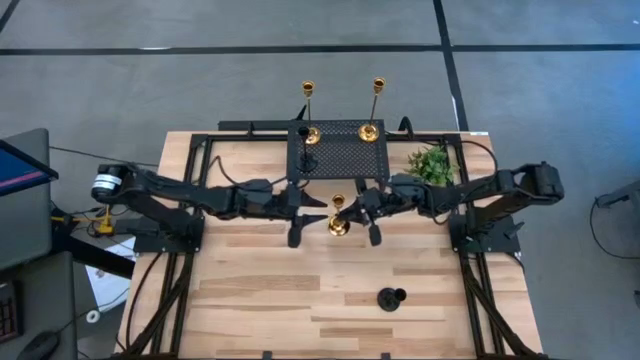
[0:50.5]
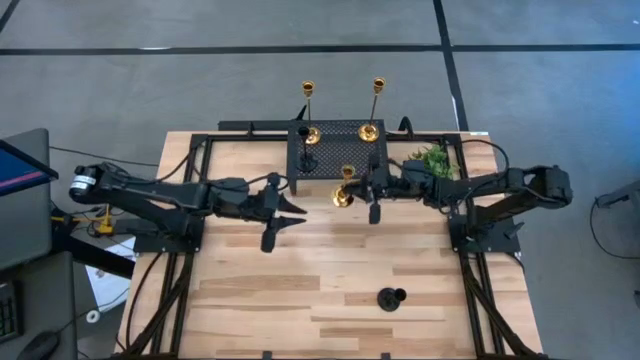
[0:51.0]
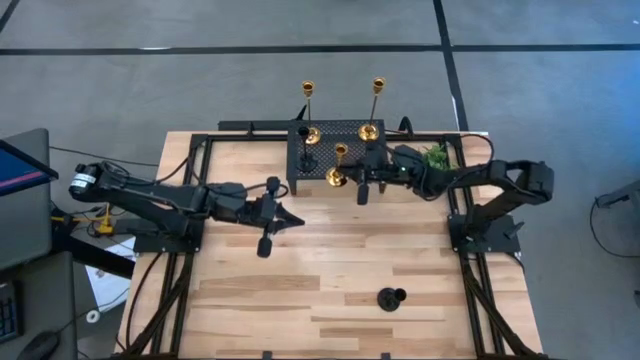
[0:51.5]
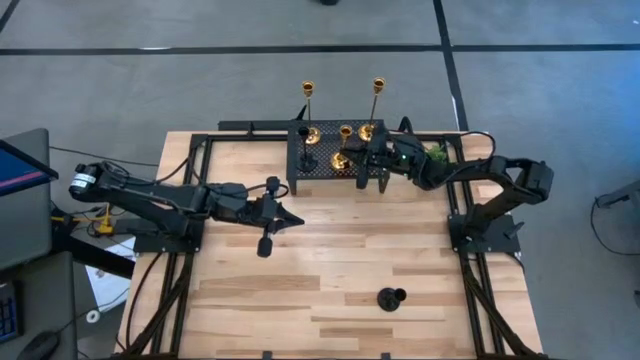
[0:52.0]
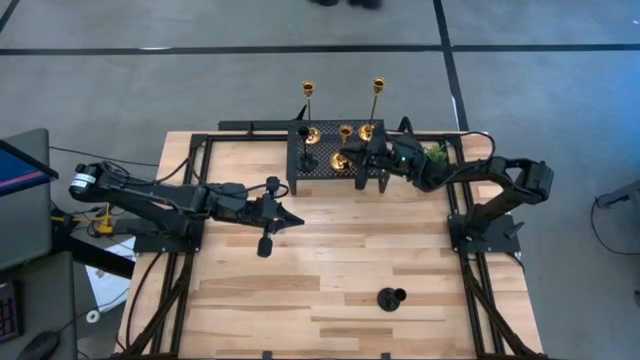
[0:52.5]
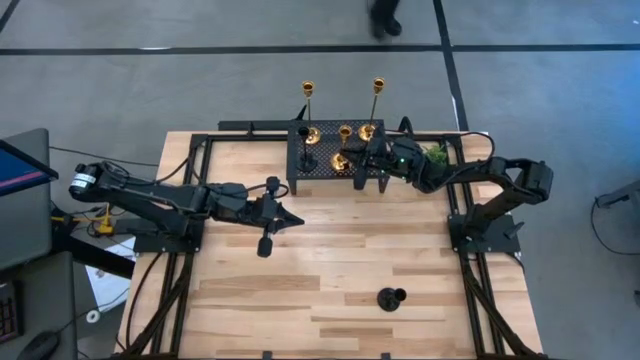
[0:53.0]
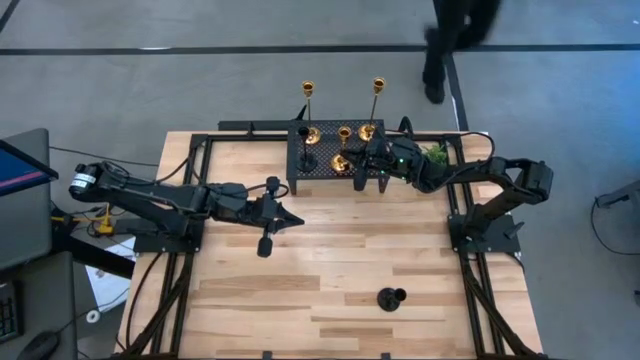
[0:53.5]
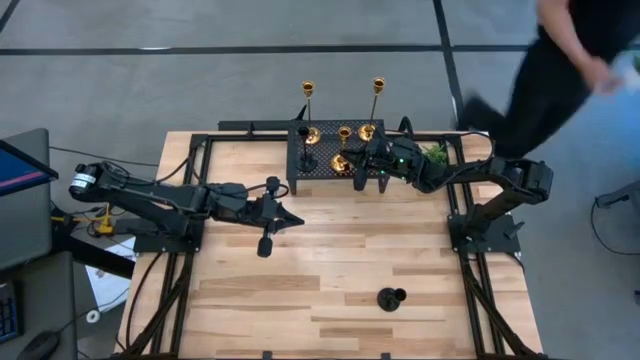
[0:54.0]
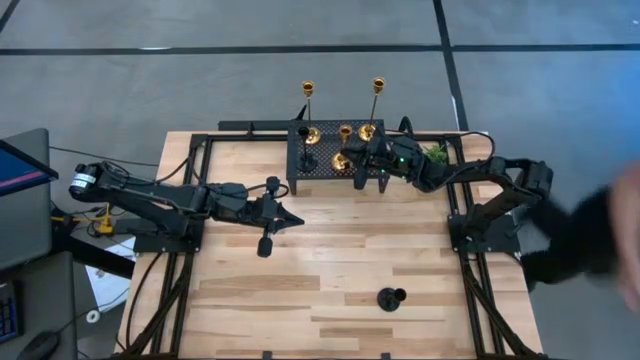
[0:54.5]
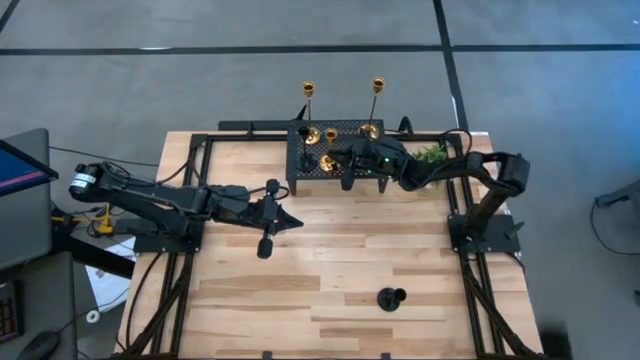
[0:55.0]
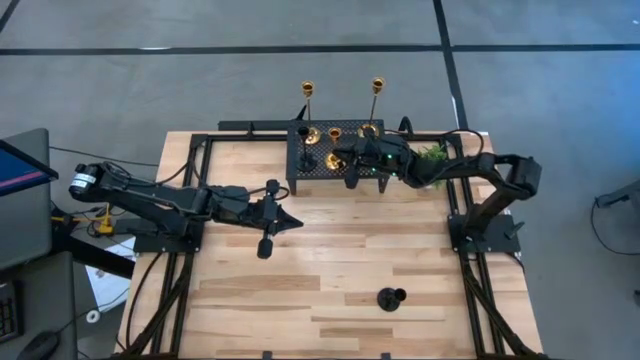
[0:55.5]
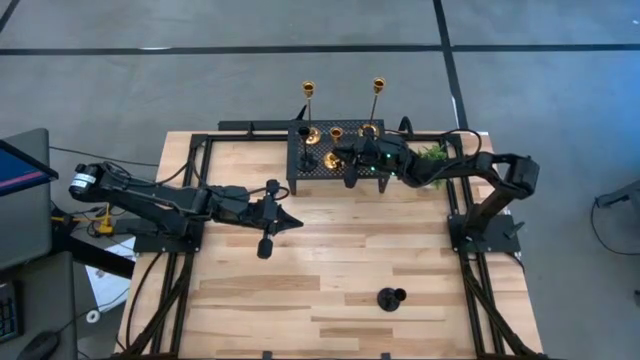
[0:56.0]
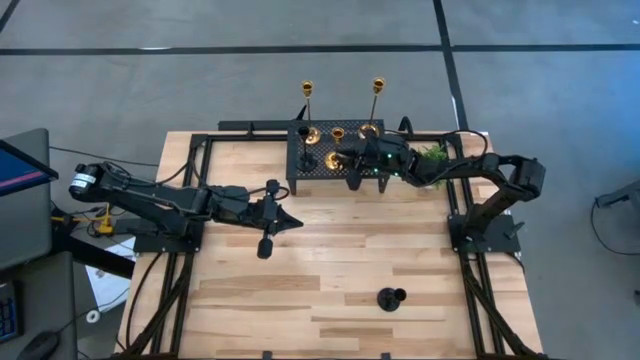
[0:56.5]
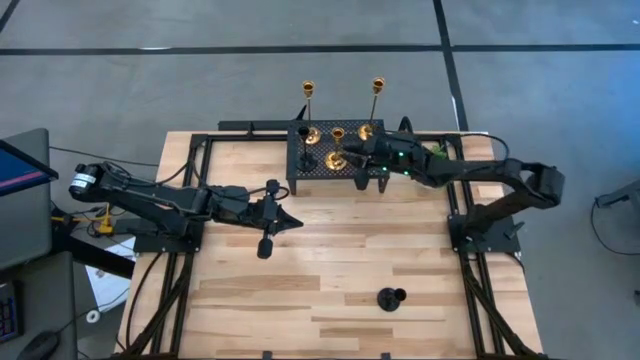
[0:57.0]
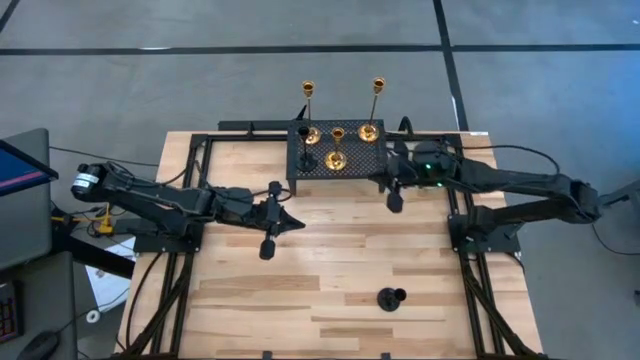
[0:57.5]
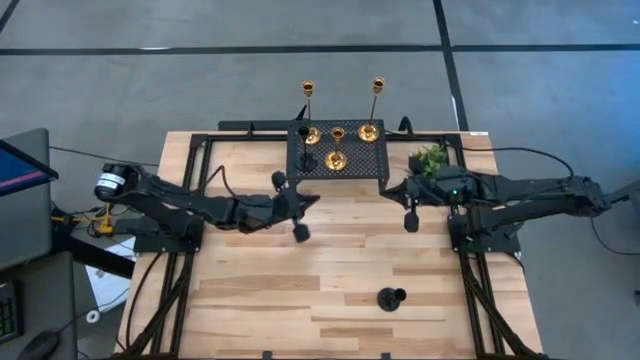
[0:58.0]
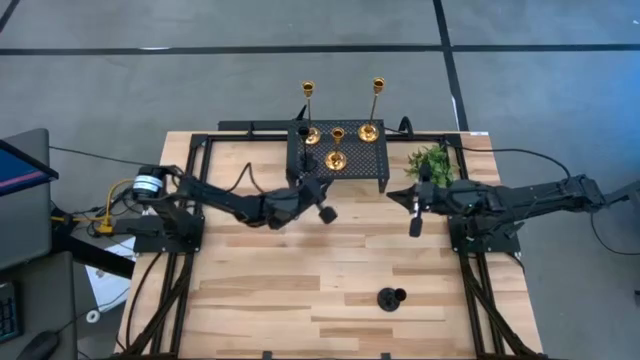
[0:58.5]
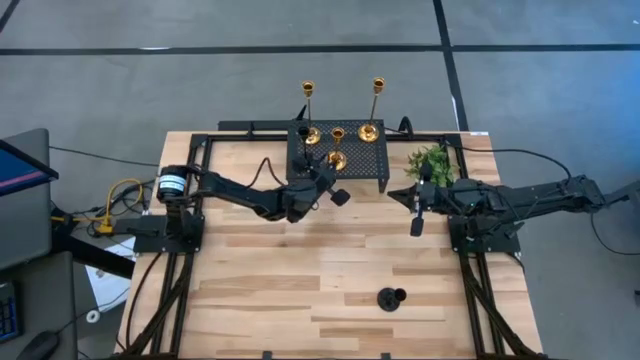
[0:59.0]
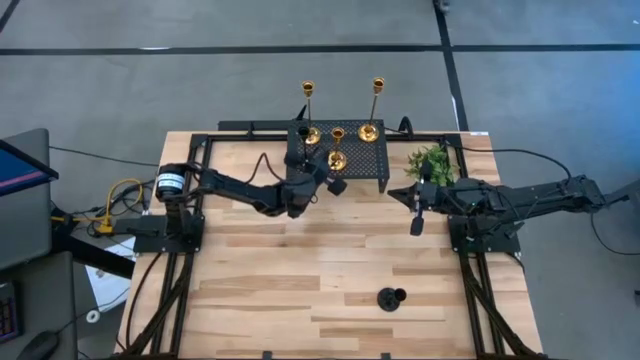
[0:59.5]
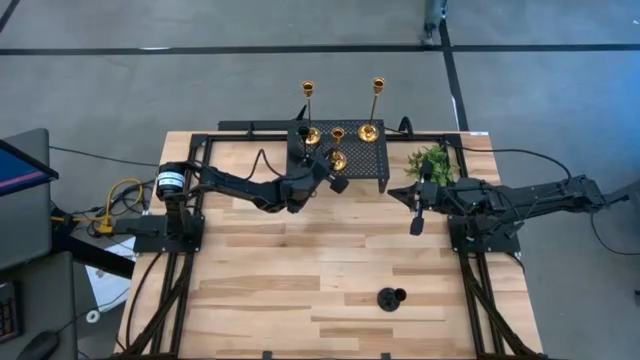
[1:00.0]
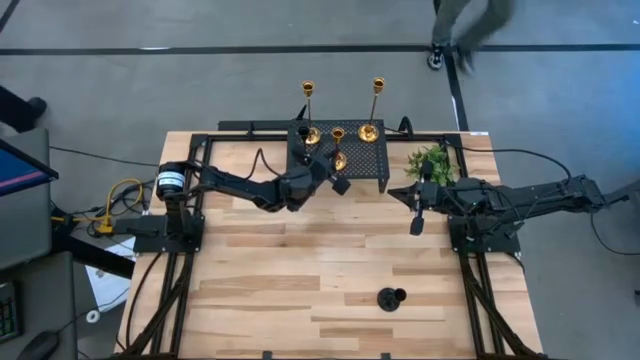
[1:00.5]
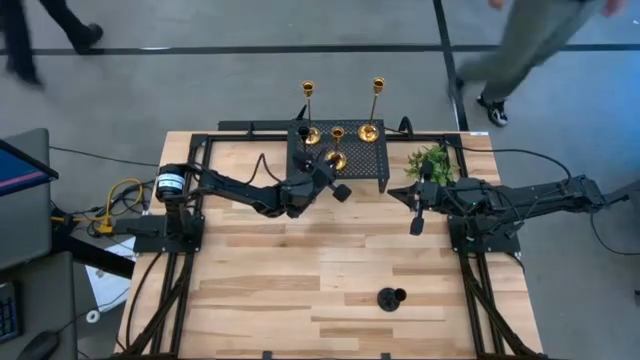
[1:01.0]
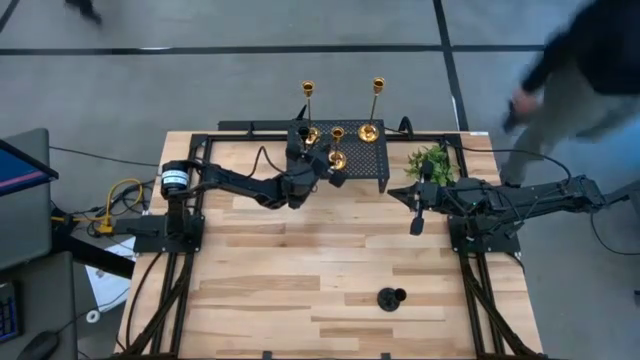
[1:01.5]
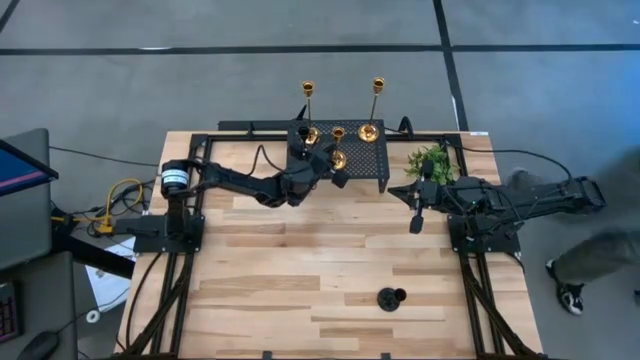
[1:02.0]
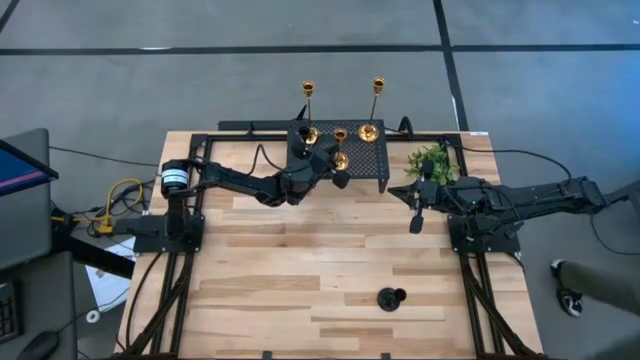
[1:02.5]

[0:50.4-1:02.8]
Task: Pick & Place candle stick holders
Put the gold candle holder on the shelf

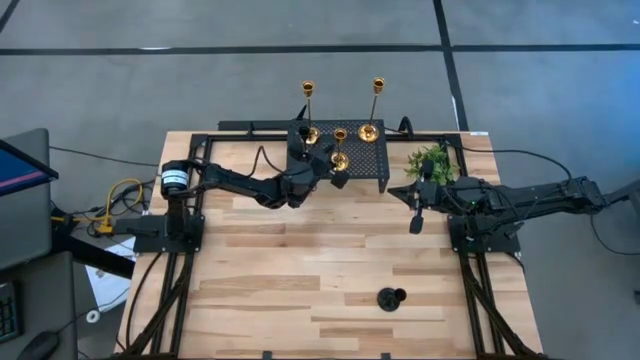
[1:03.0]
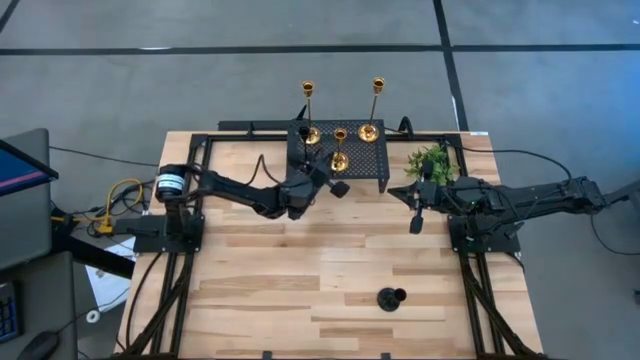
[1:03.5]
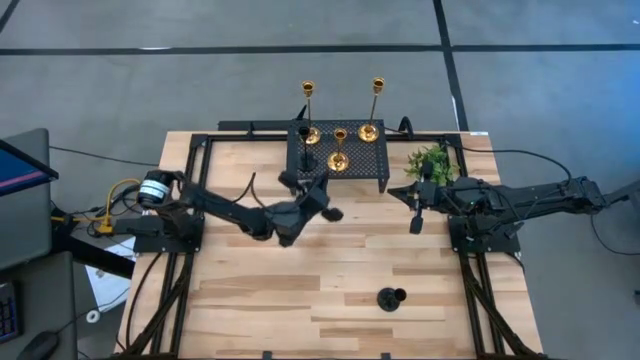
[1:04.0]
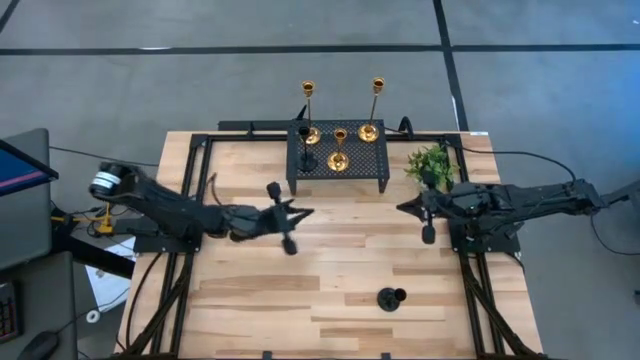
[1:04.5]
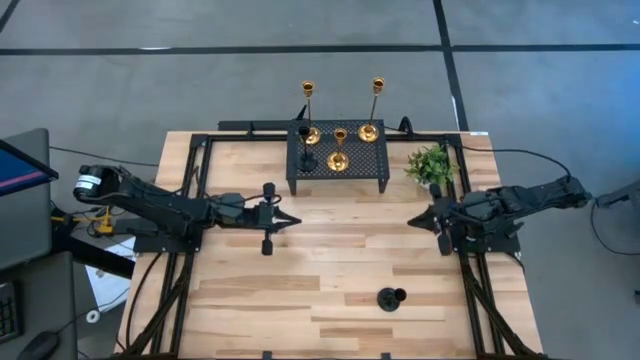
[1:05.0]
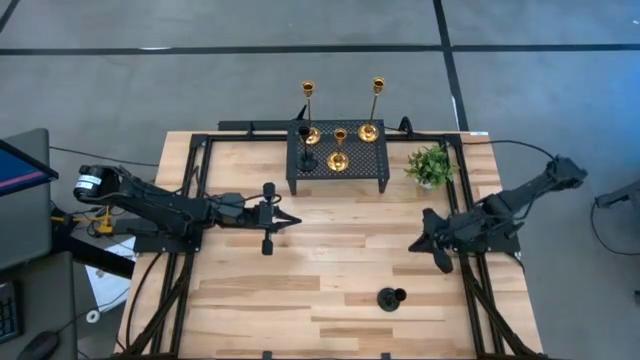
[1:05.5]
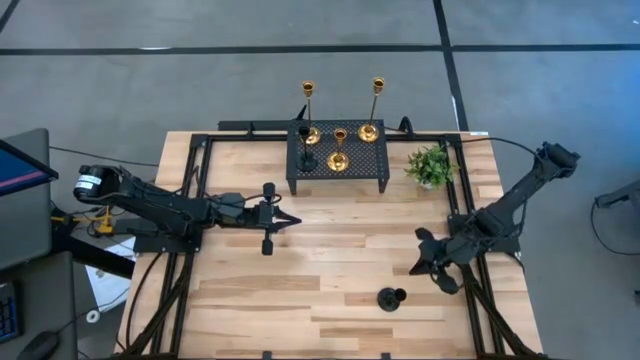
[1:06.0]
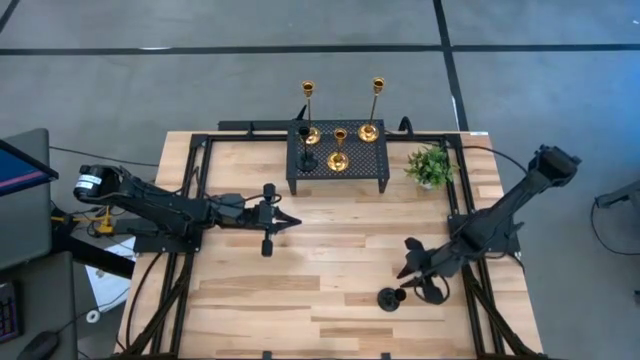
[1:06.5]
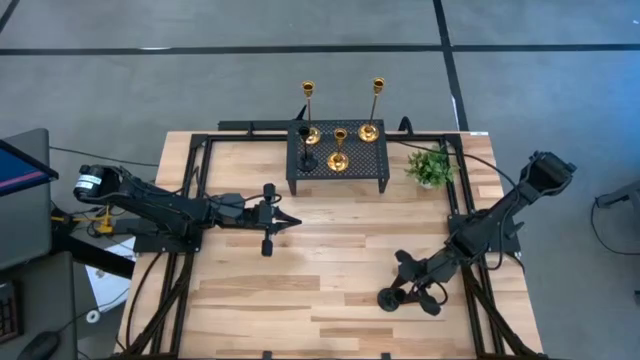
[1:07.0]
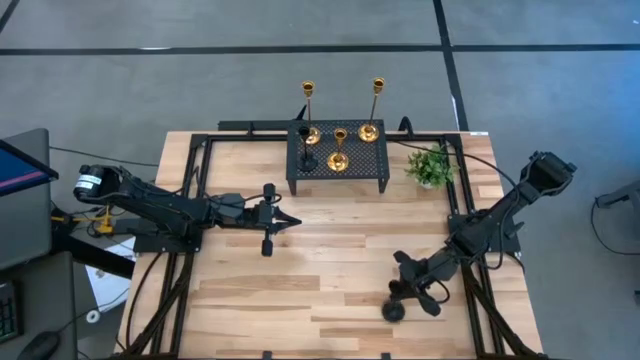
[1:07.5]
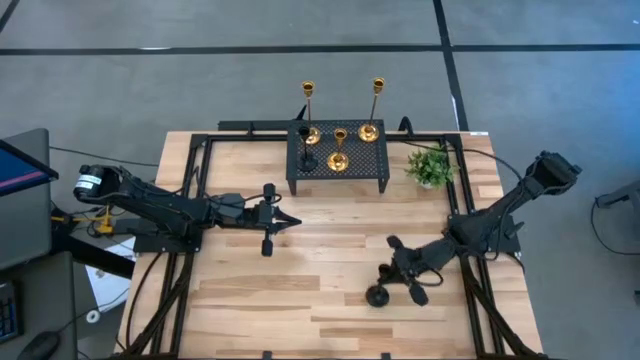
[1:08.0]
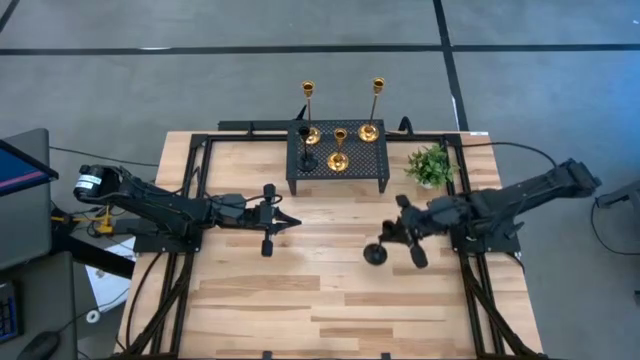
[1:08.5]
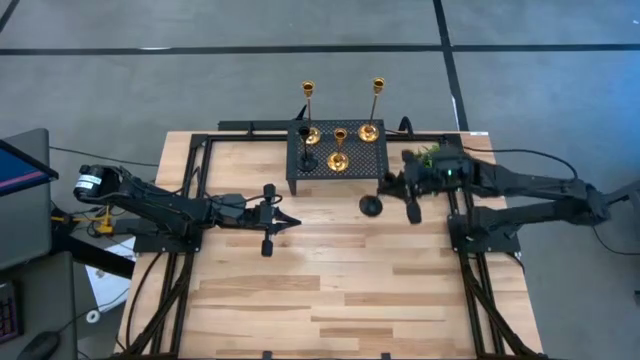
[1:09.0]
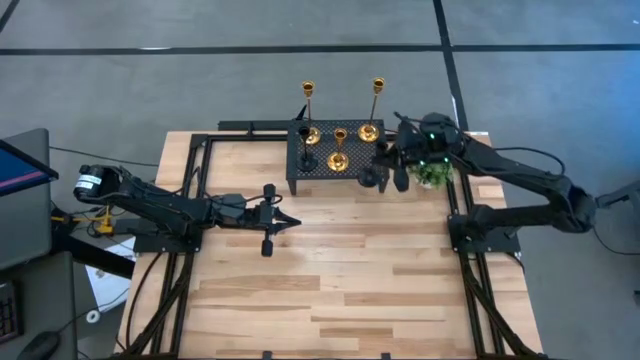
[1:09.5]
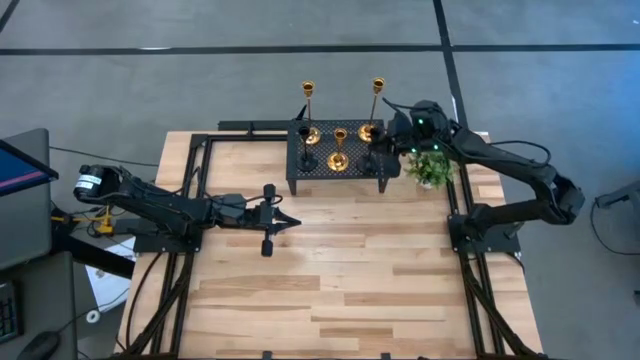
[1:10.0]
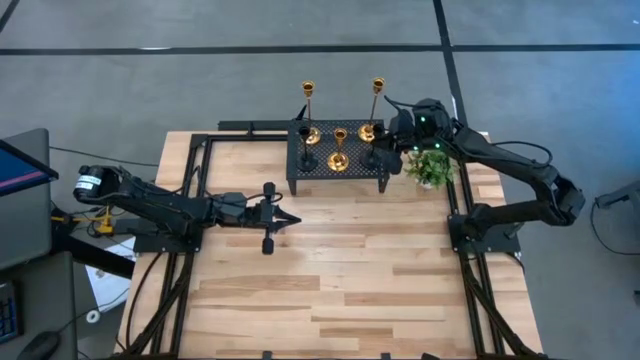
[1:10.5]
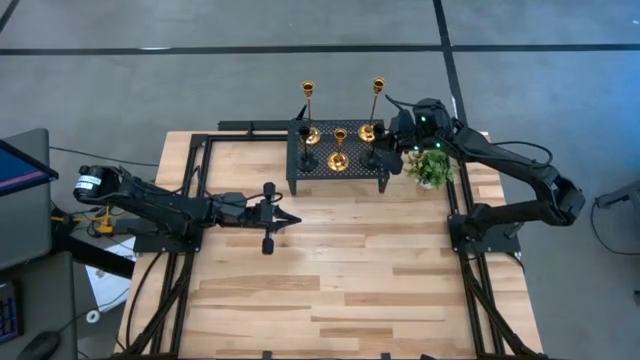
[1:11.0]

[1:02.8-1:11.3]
Put the black candle holder on the shelf

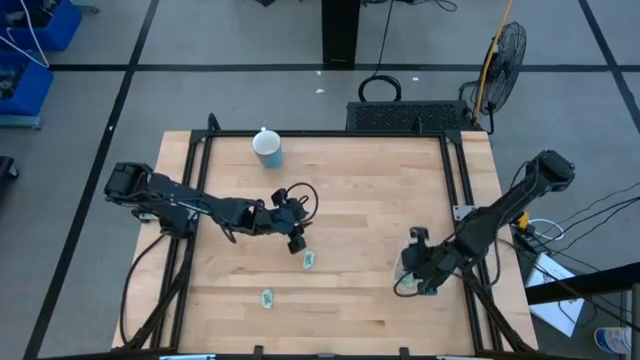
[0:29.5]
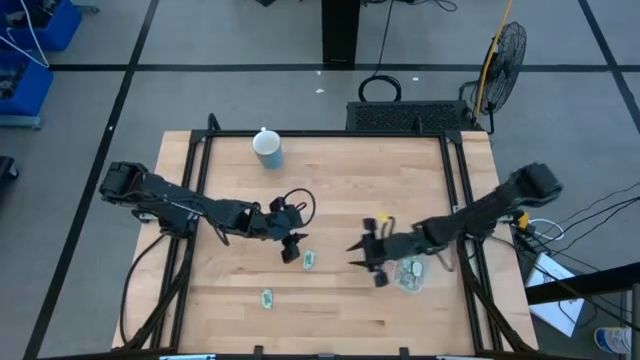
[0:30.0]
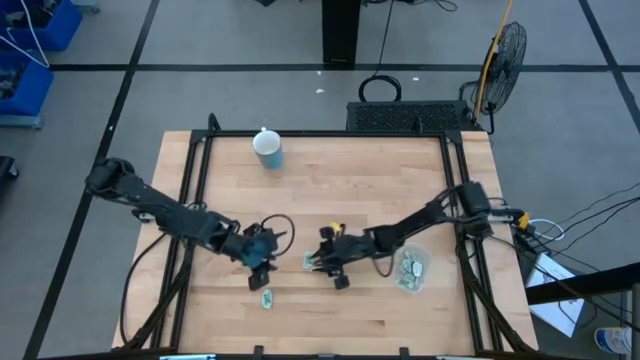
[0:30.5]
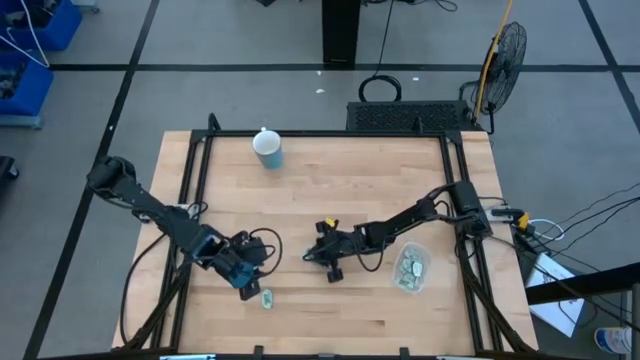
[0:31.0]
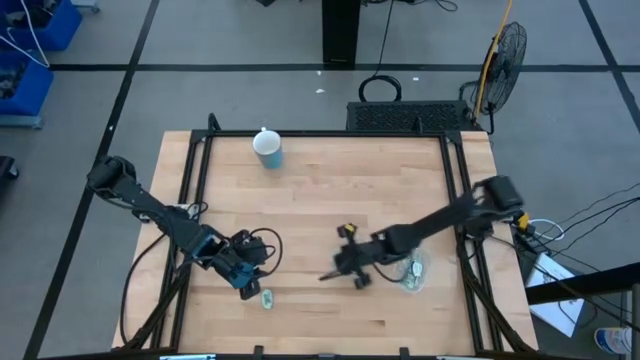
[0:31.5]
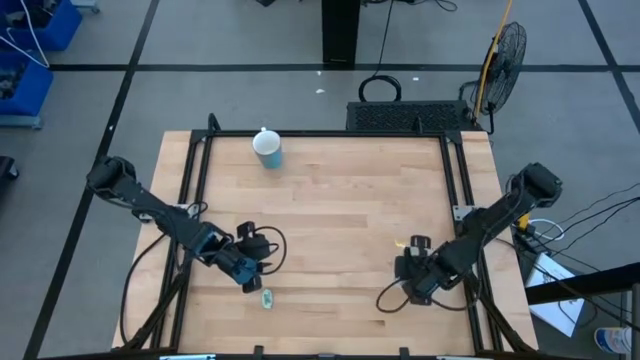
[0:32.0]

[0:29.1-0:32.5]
Task: Pick and place Stevia / Truvia into bins
Put the stevia packet into the transparent container
